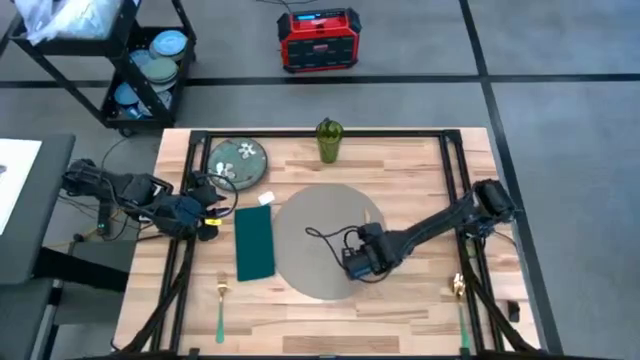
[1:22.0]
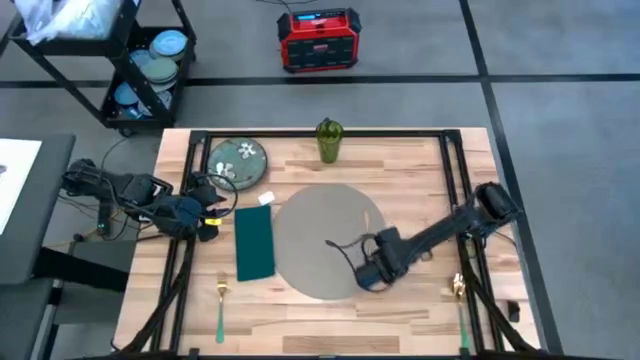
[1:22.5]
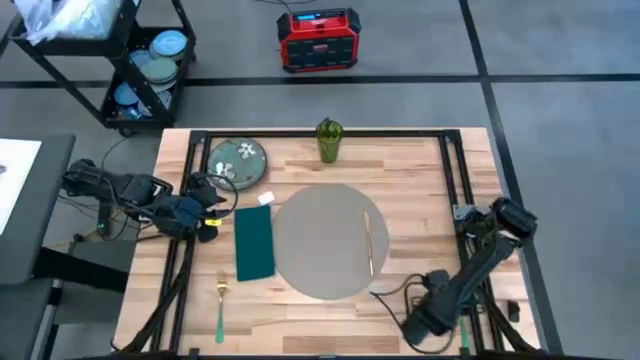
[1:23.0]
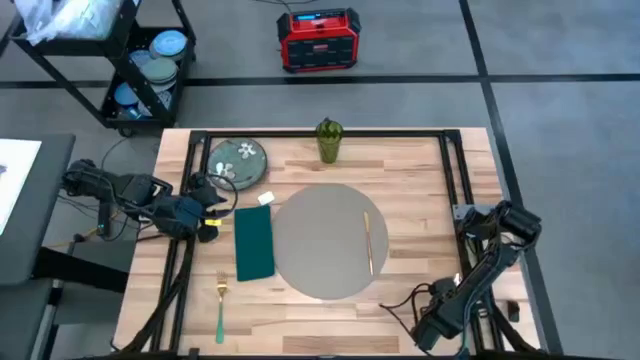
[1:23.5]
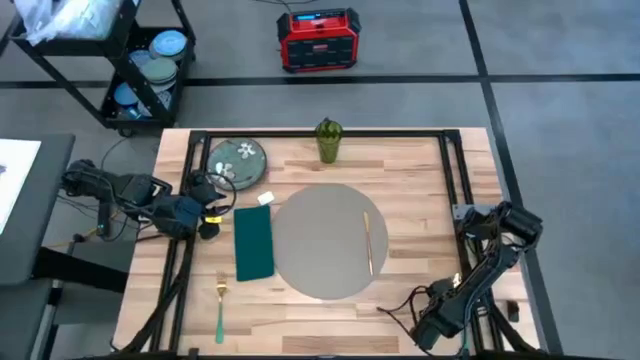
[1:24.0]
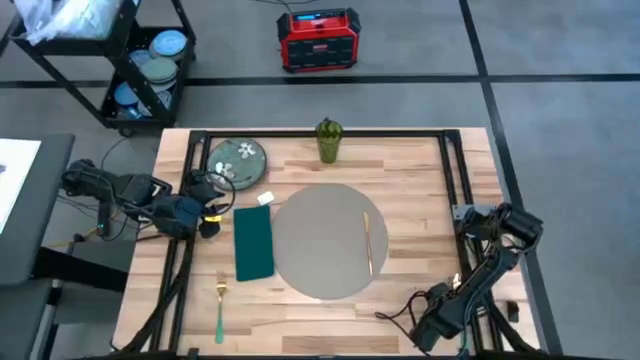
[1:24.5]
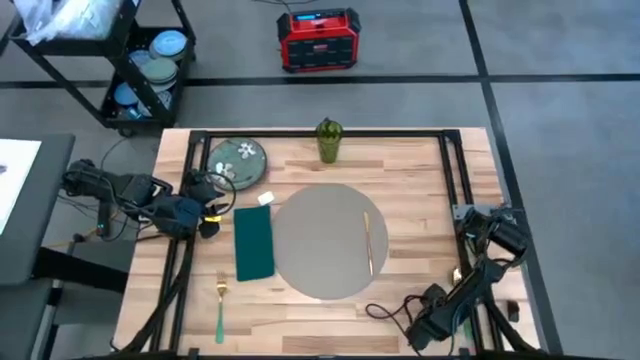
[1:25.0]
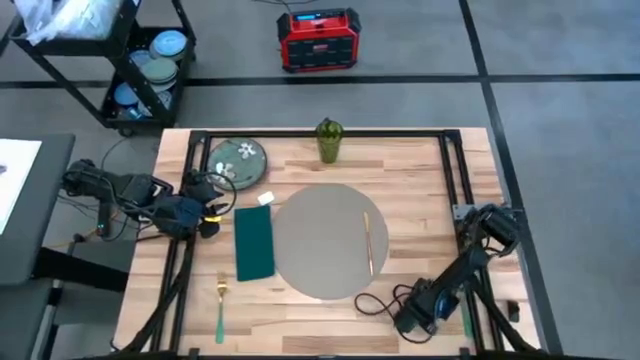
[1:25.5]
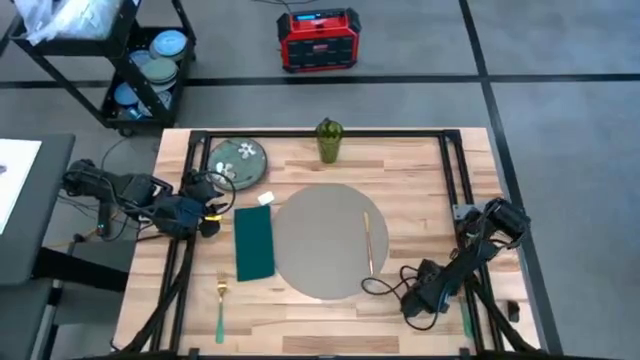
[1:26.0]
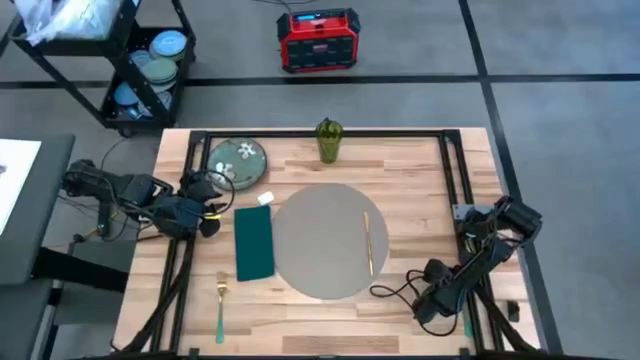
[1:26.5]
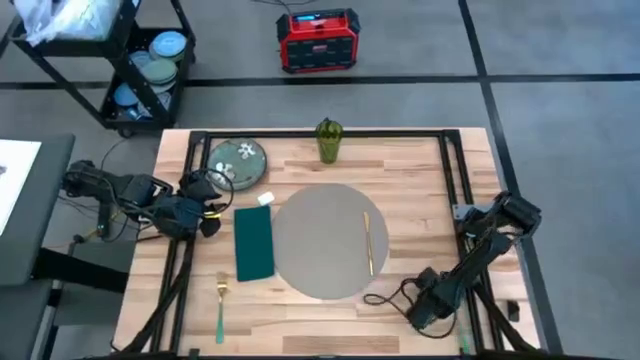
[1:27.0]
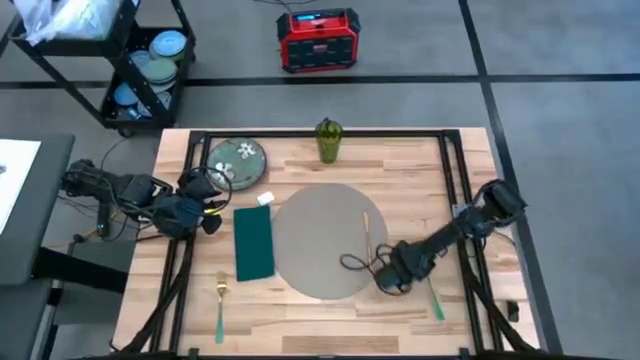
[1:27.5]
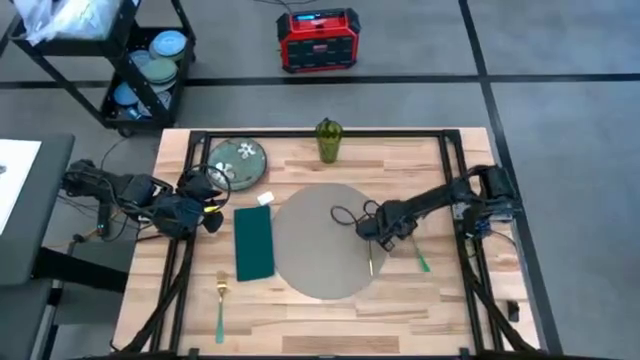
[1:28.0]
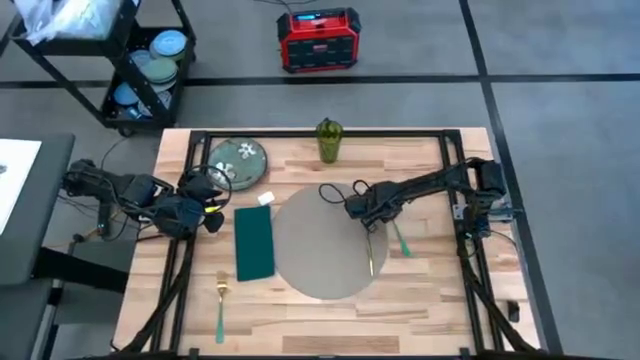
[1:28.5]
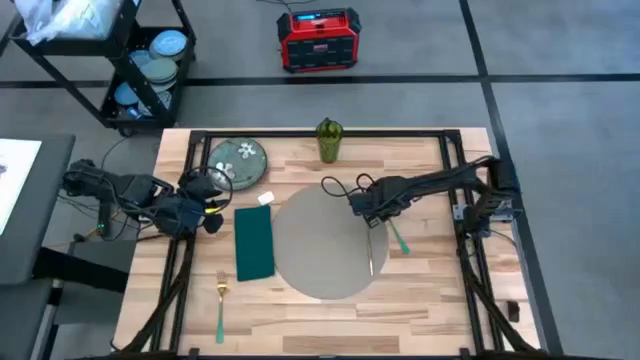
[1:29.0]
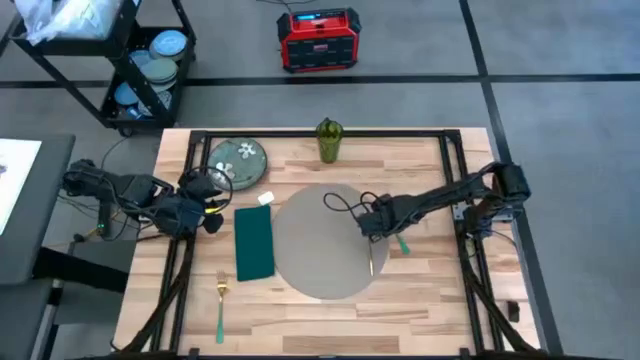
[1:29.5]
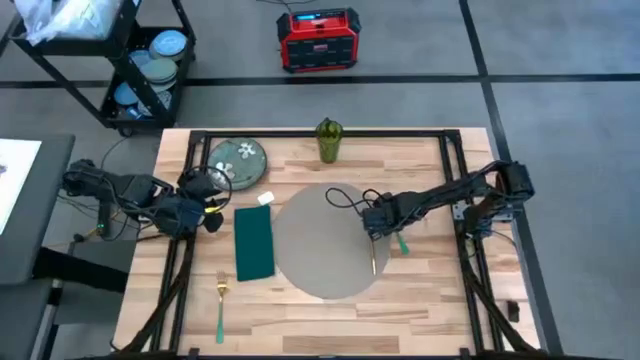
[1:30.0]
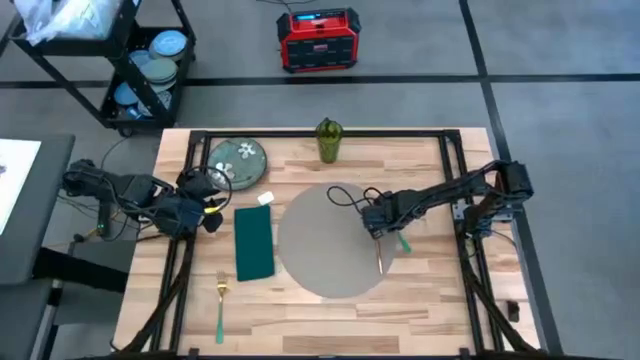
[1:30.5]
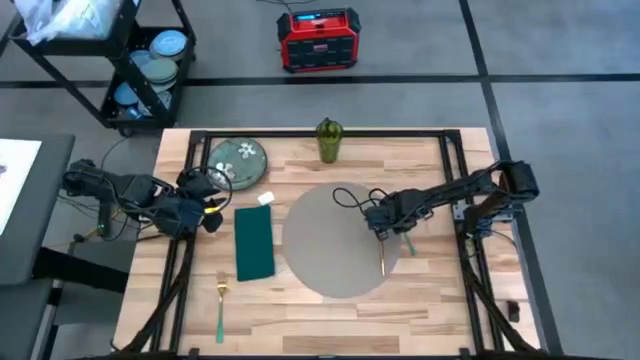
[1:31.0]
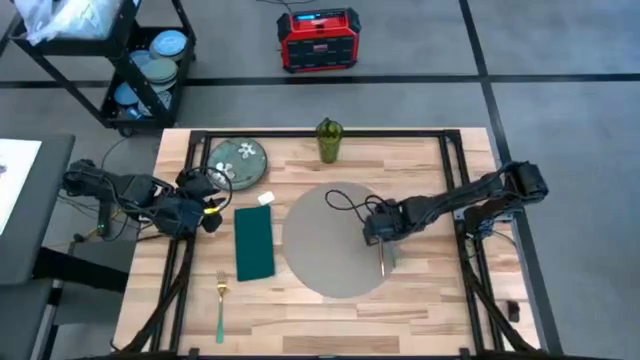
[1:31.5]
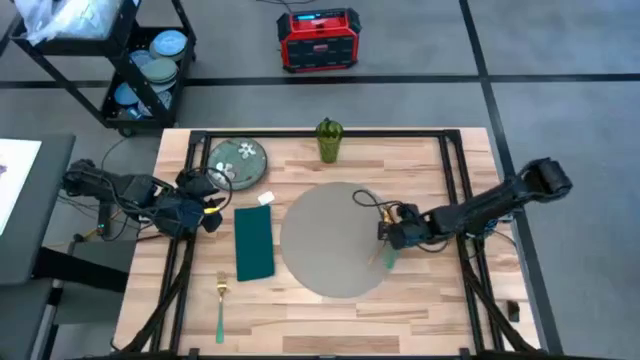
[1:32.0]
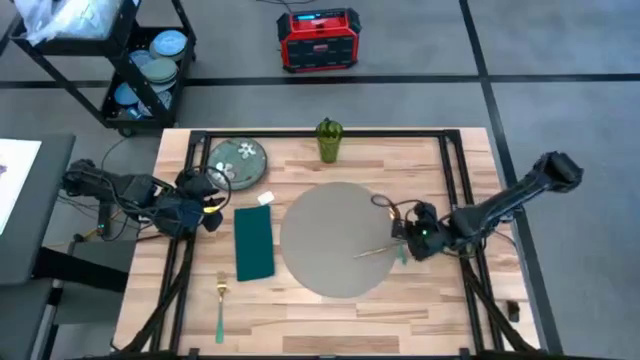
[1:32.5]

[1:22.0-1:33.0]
Task: Set table place
Put the green spoon to the right of the gold knife

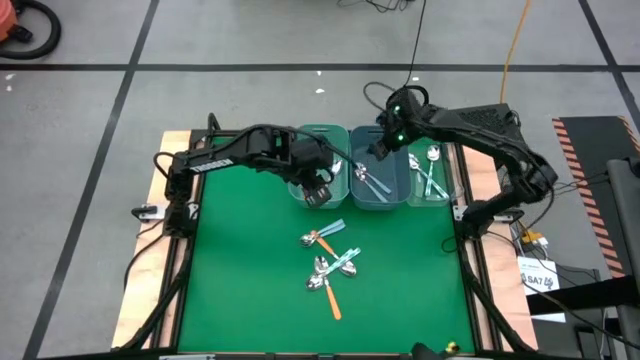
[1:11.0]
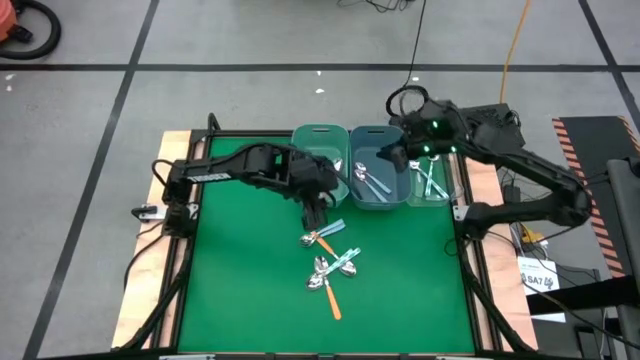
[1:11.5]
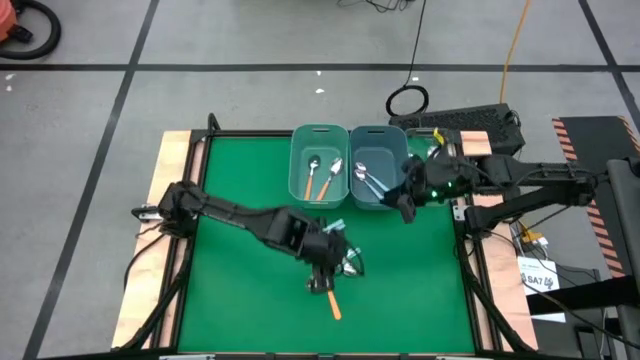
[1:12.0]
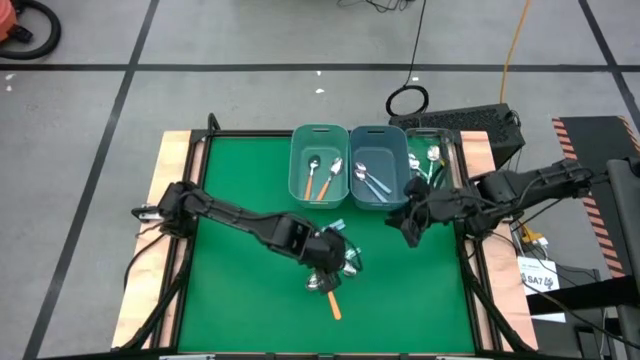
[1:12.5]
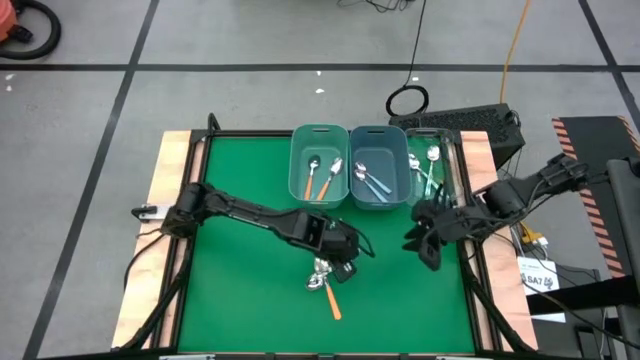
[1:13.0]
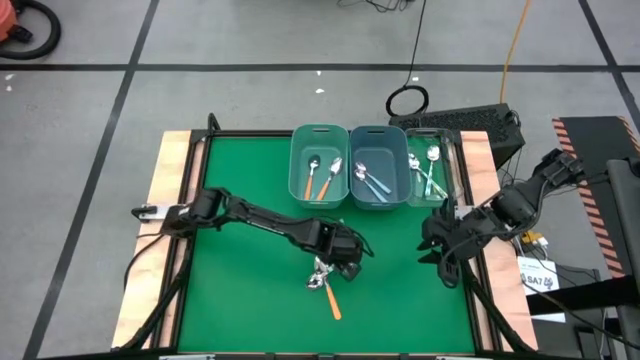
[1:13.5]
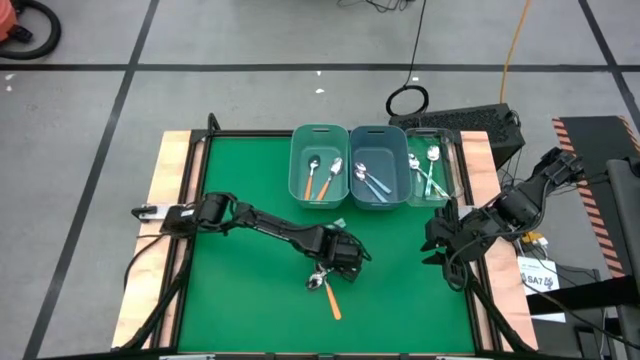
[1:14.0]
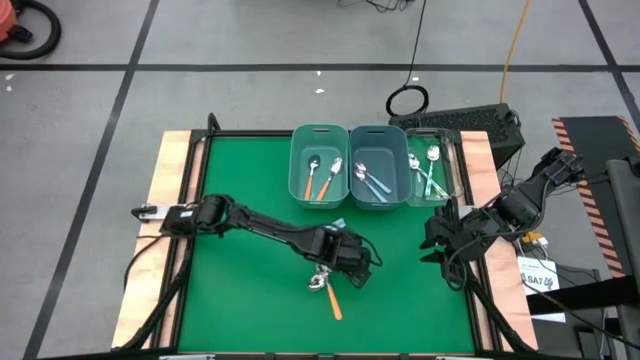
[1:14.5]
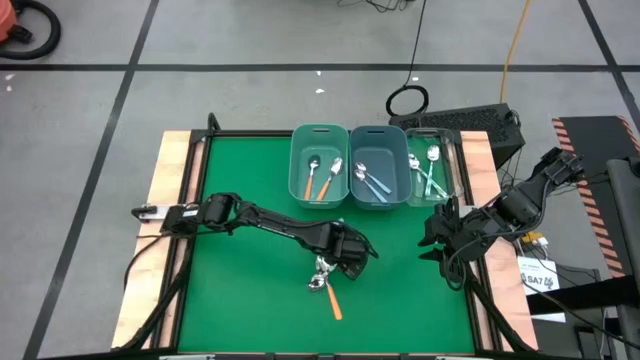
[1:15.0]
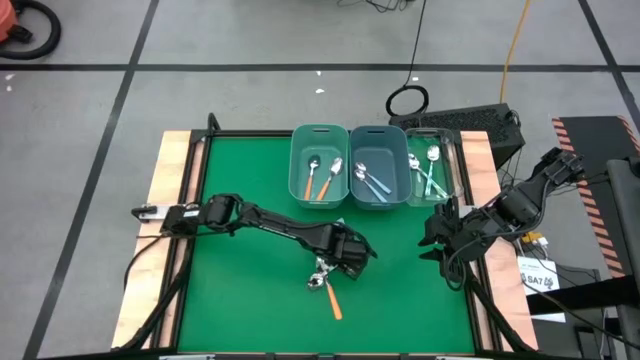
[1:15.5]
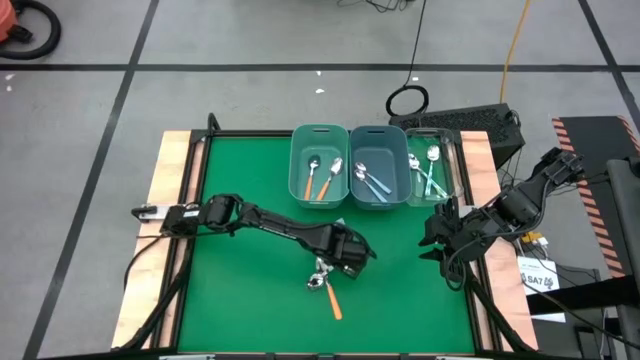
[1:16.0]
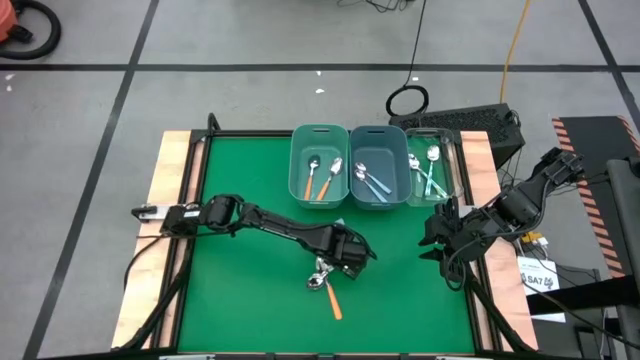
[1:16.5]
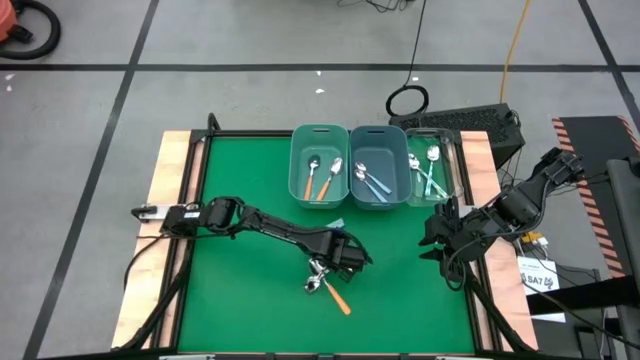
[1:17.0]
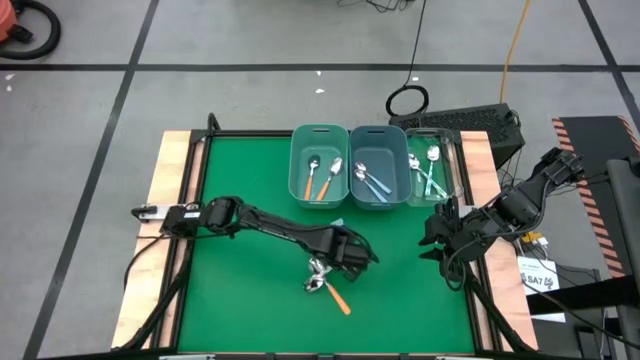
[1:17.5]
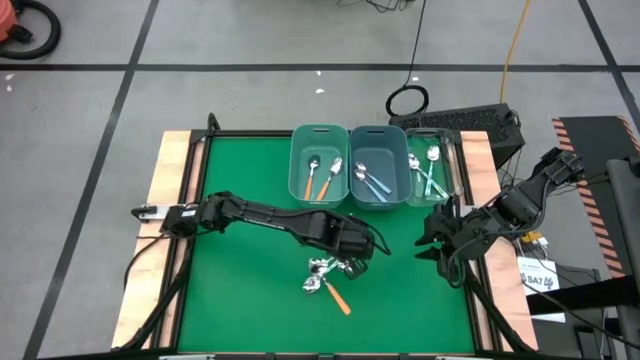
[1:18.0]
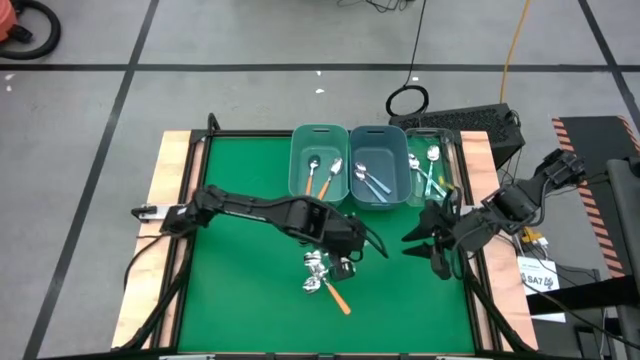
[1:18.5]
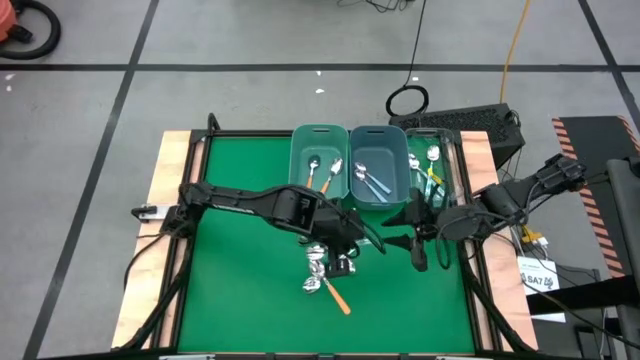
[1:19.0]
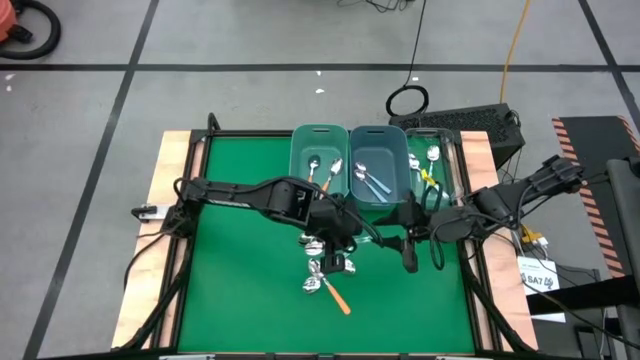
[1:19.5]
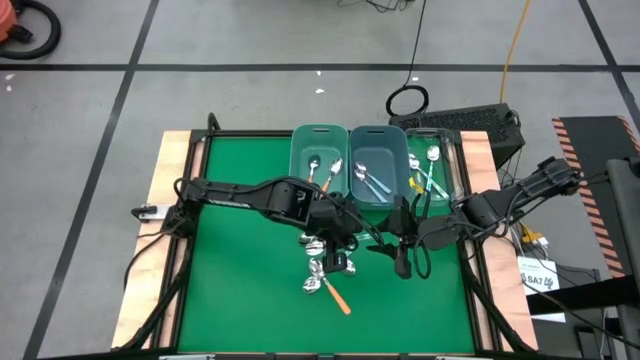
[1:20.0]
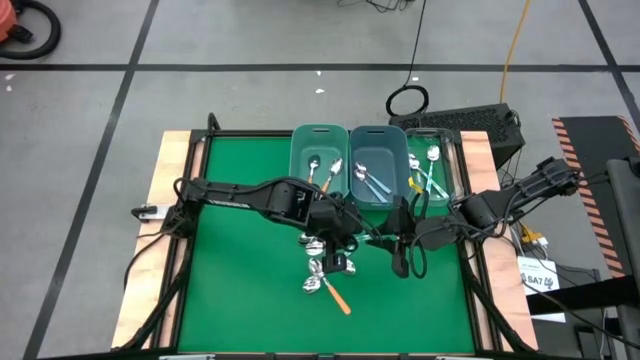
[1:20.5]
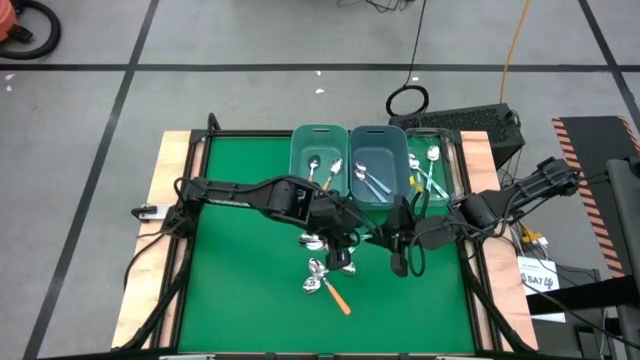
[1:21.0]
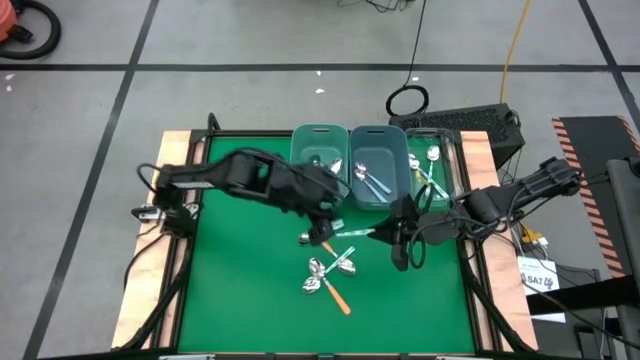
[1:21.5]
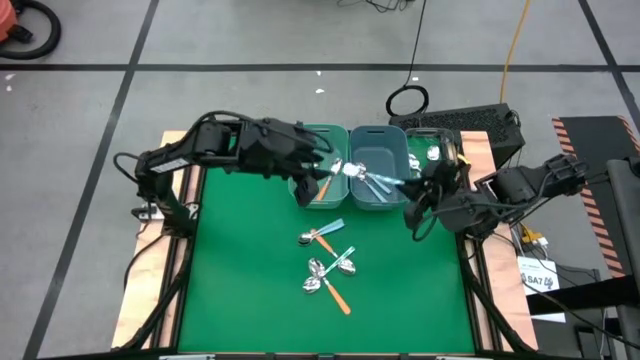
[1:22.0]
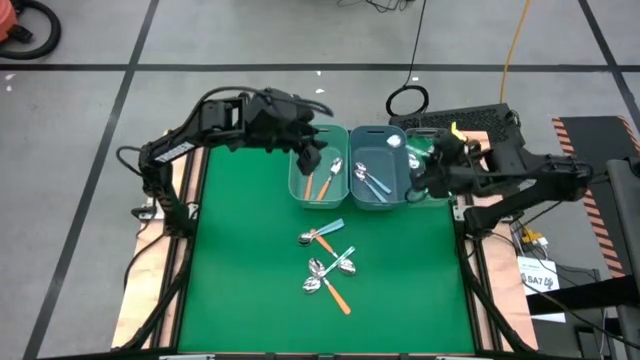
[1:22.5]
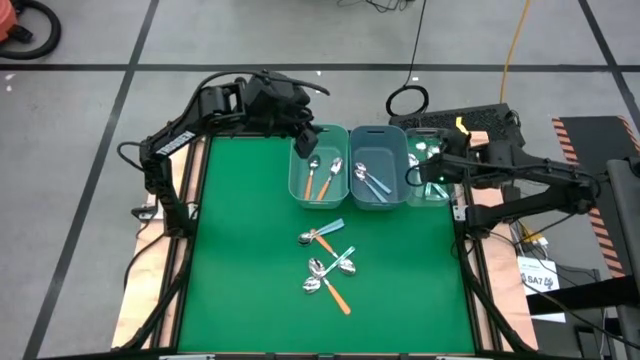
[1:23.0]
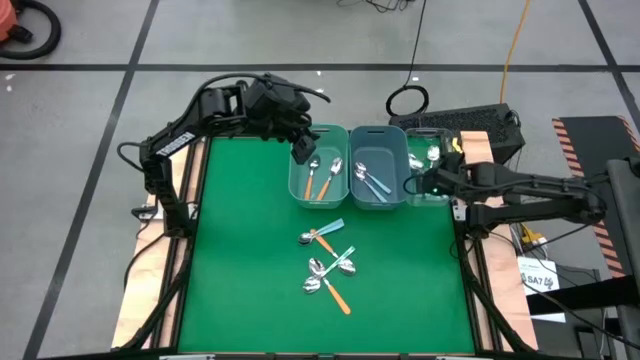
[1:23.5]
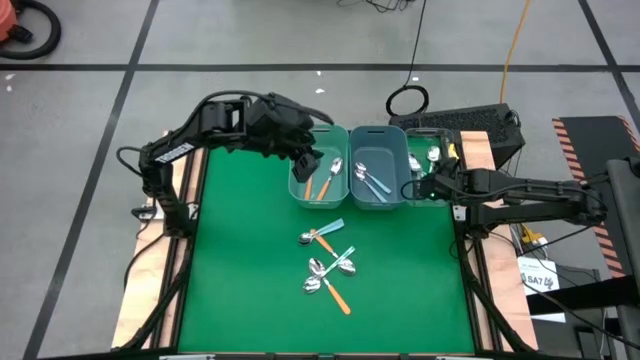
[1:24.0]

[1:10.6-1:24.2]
Task: Sort silverware by color (type)
Put the green spoon into the transparent bin
